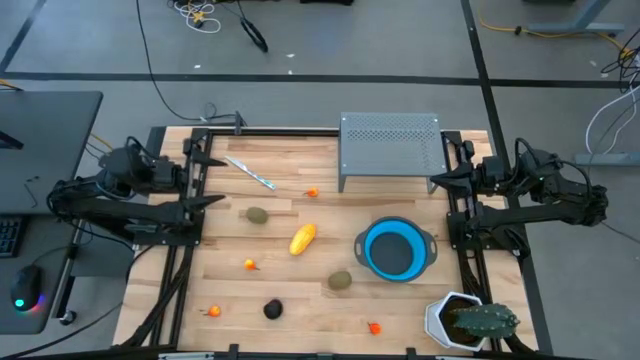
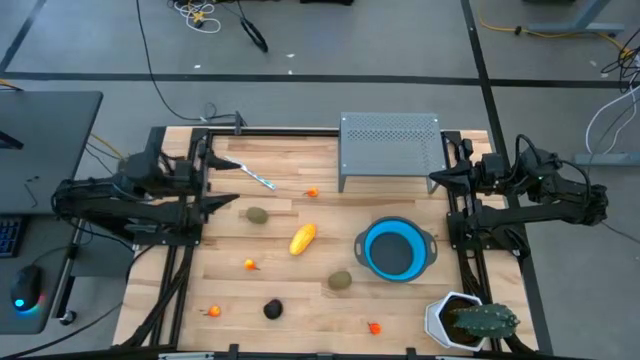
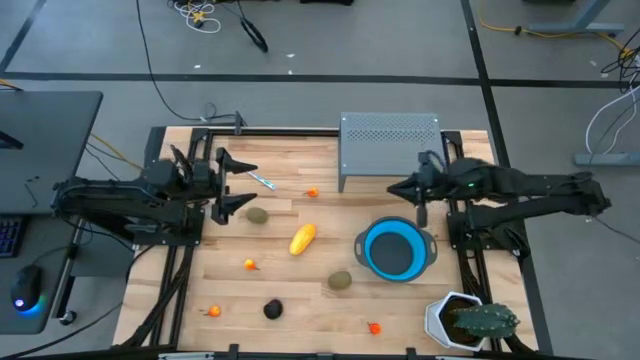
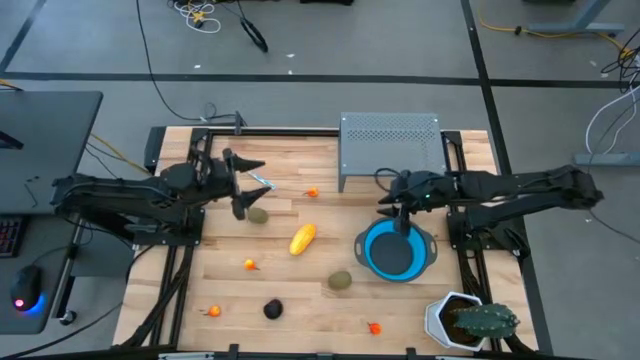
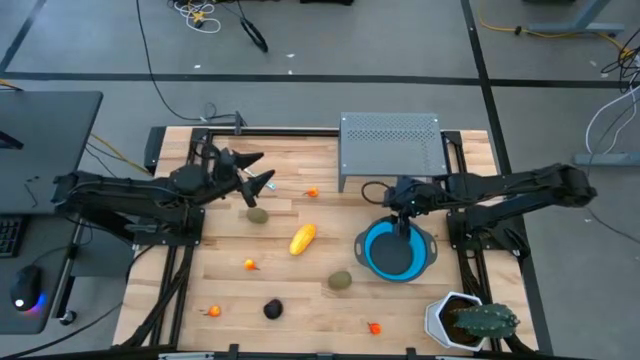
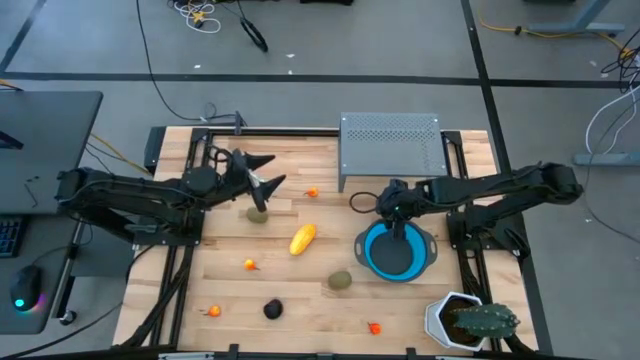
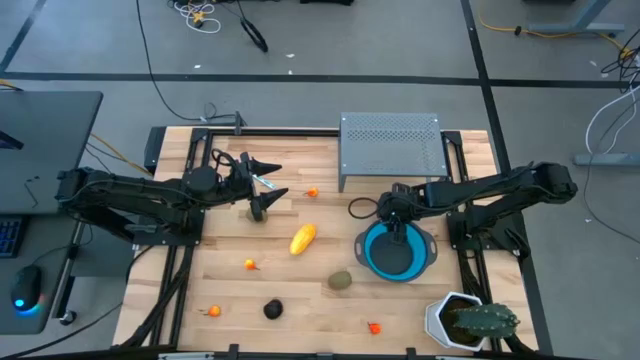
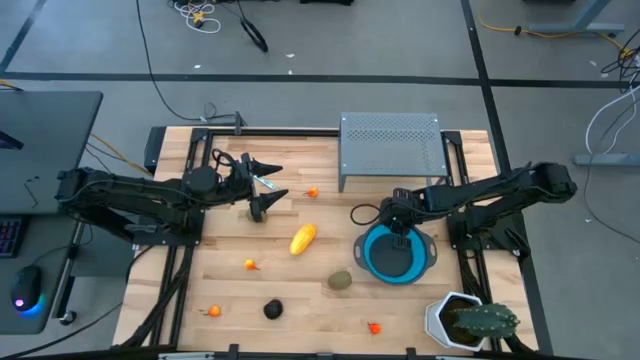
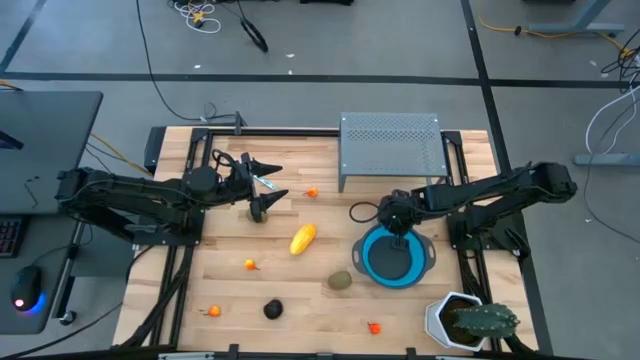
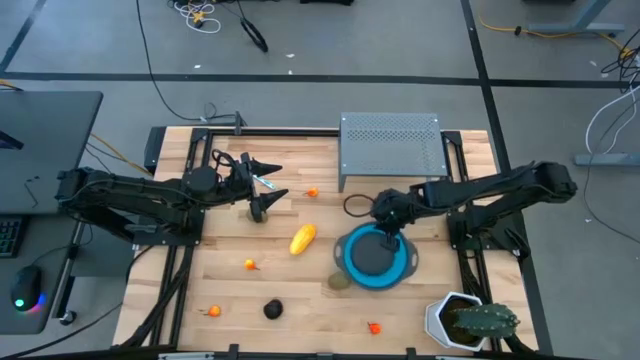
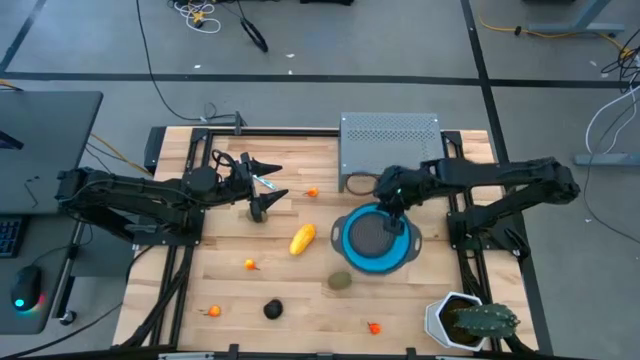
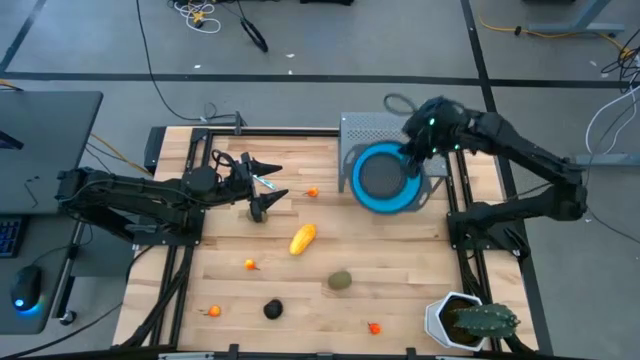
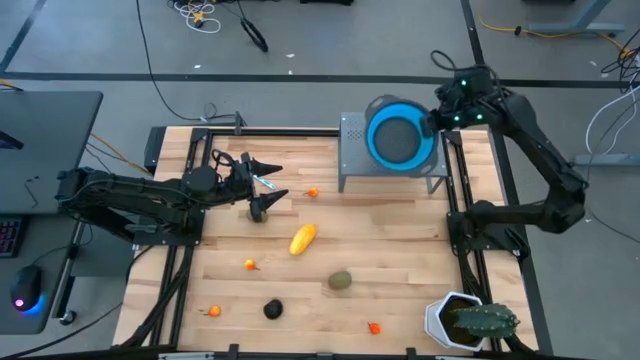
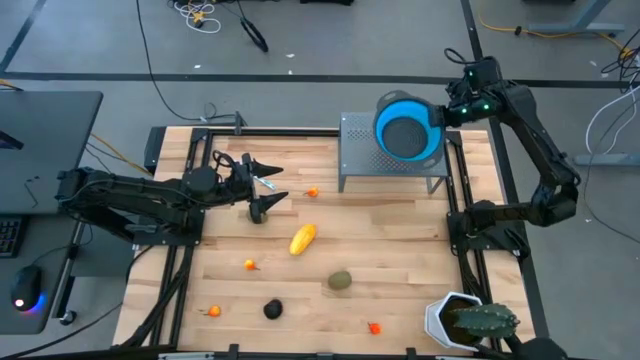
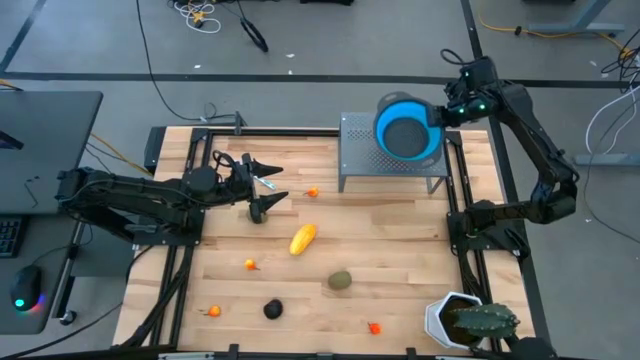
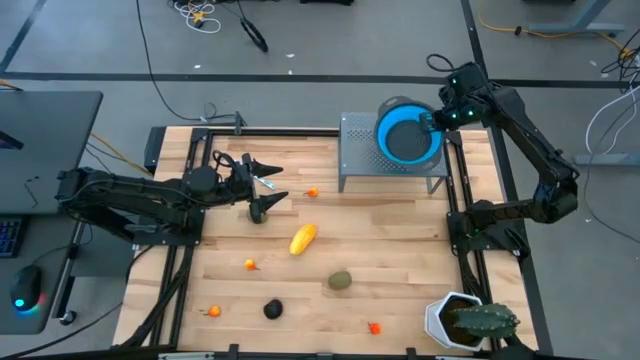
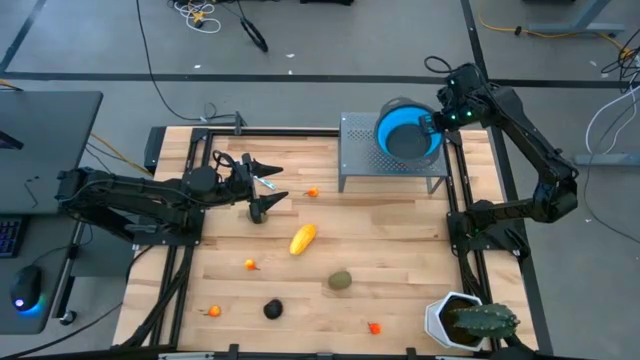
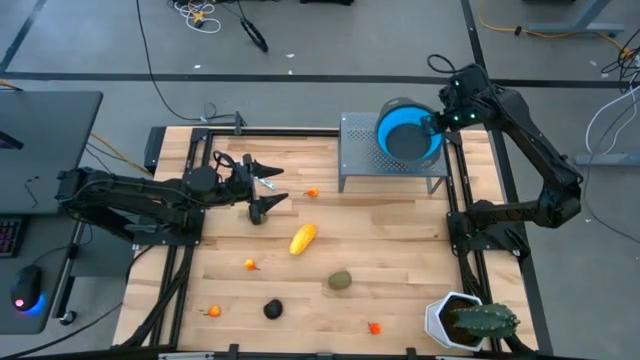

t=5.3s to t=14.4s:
Task: Pick & Place Fruit
Put the blue strainer bowl on the shelf

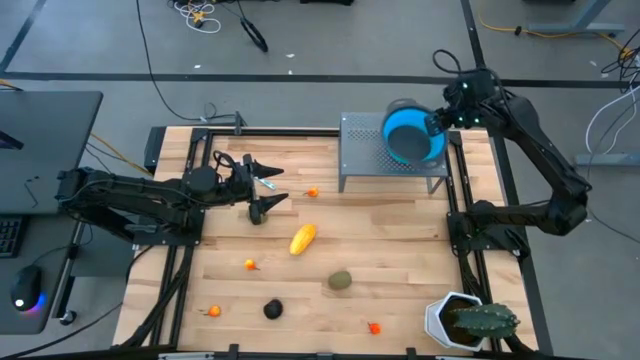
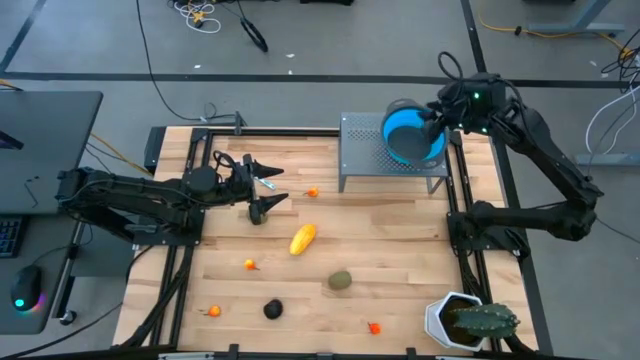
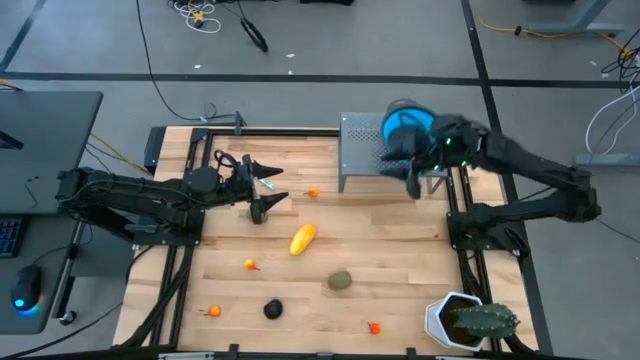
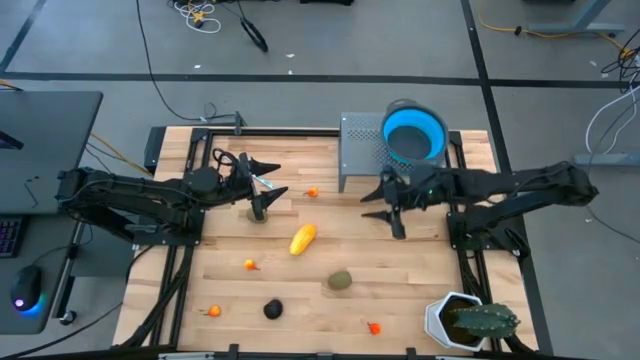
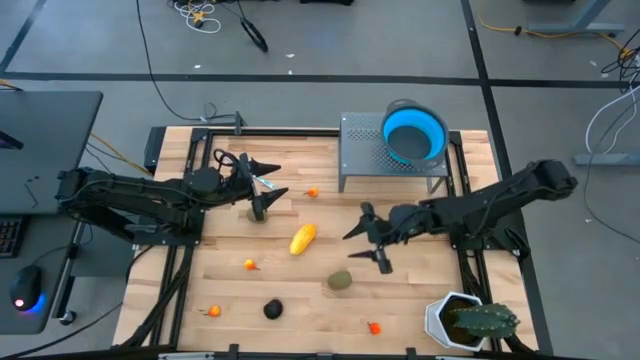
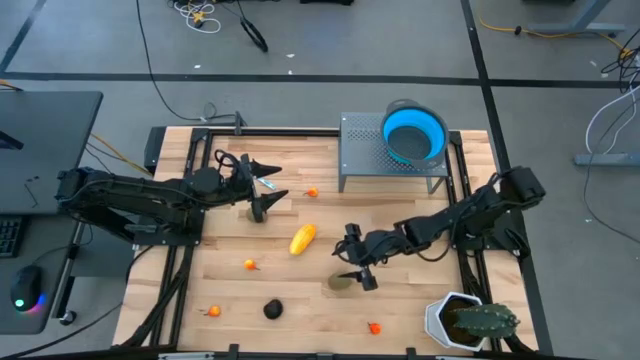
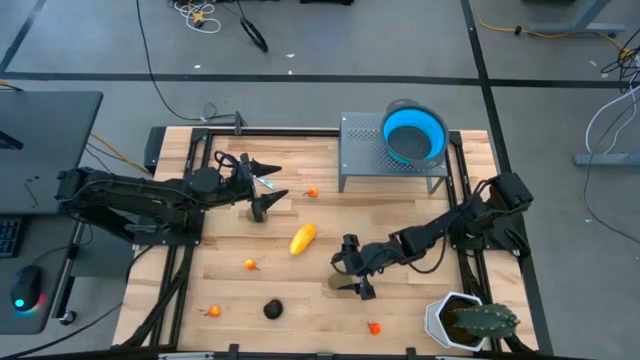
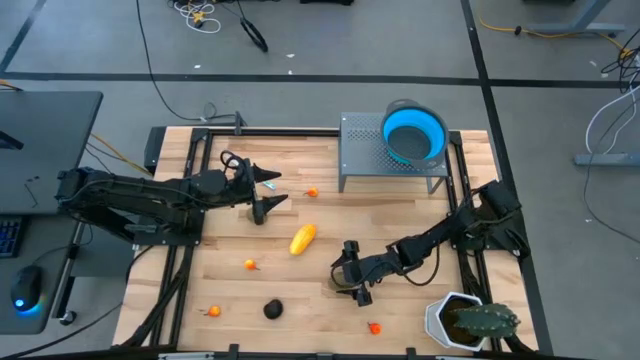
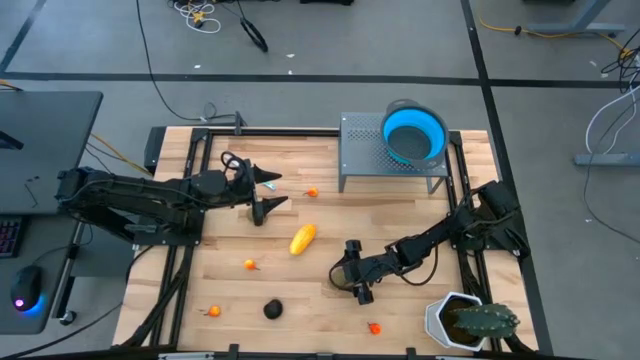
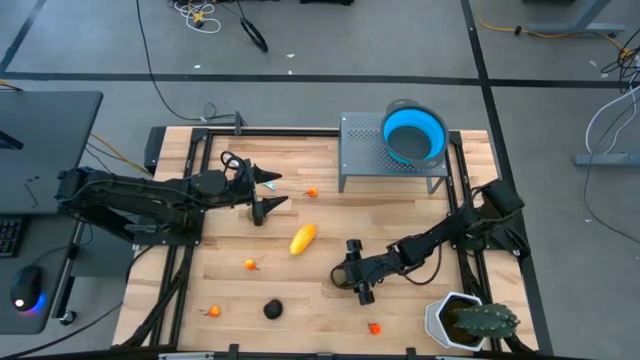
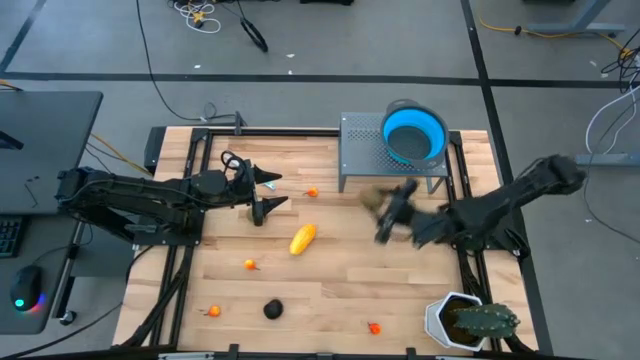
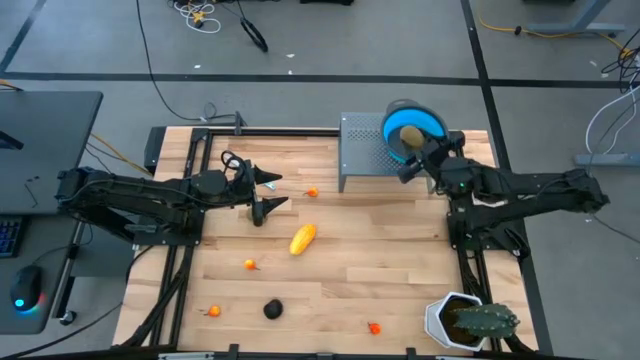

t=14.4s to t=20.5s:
Put the brown kiwi into the blue strainer bowl on the shelf

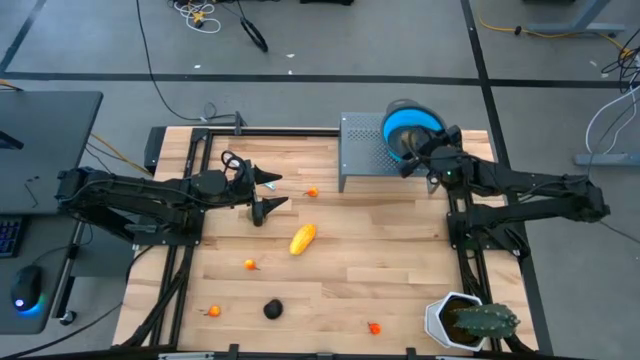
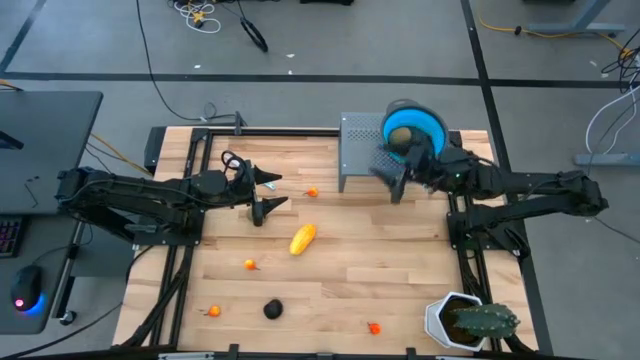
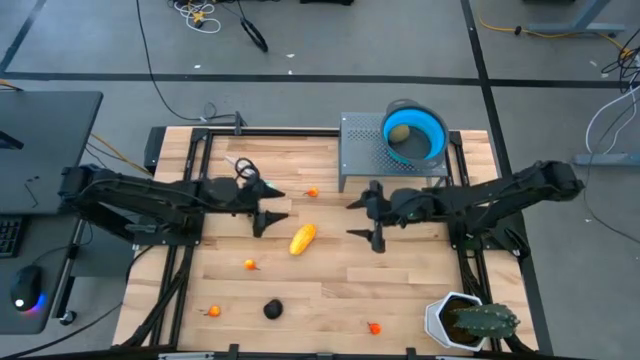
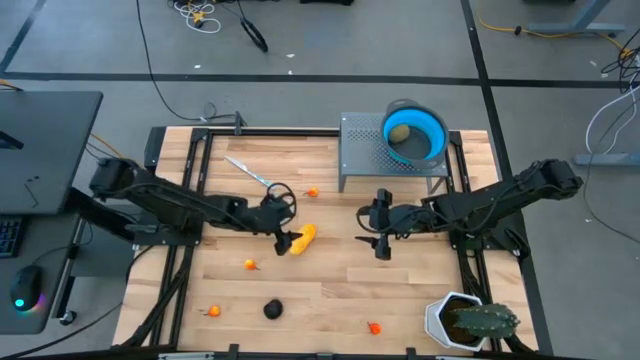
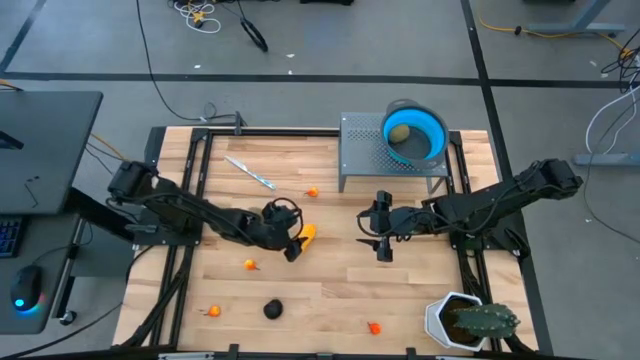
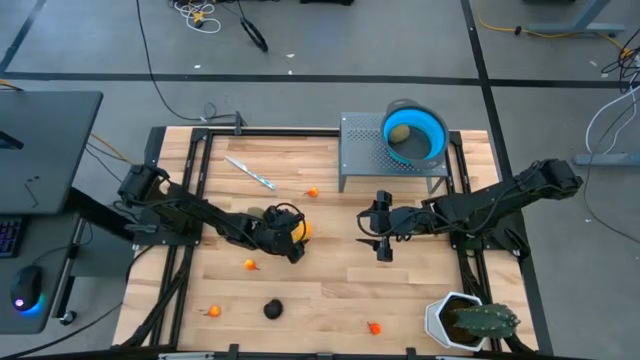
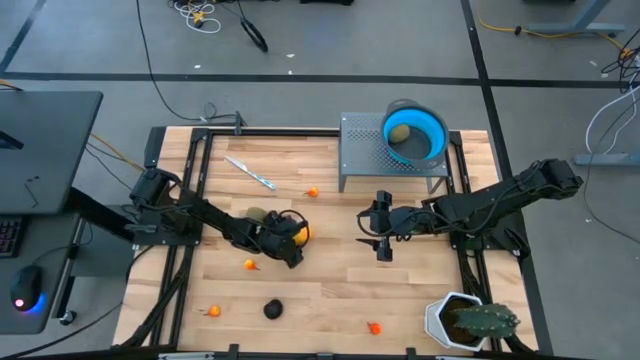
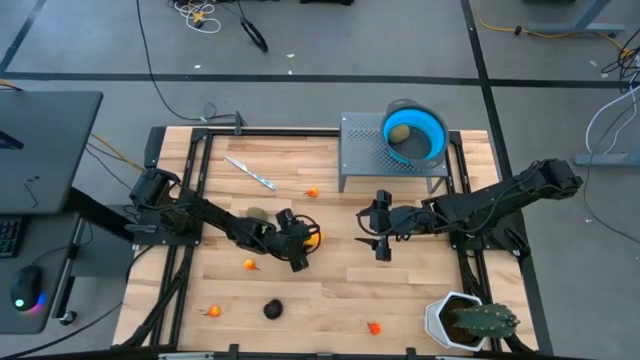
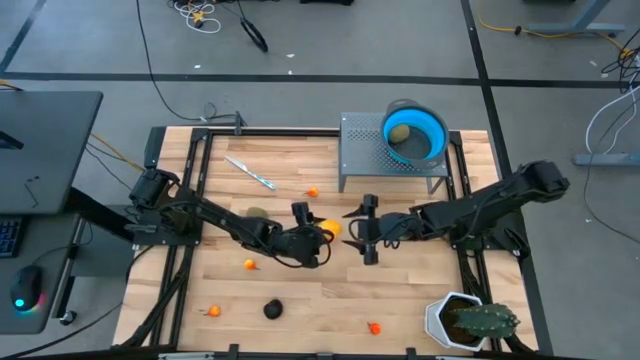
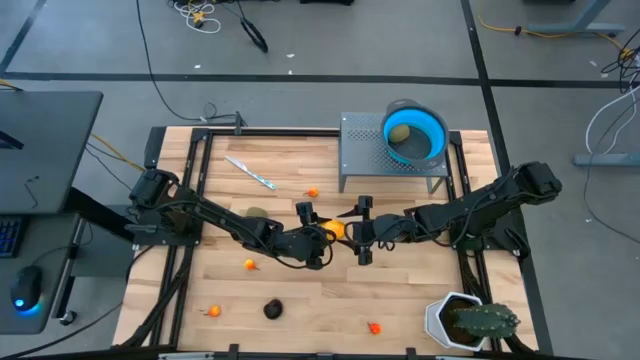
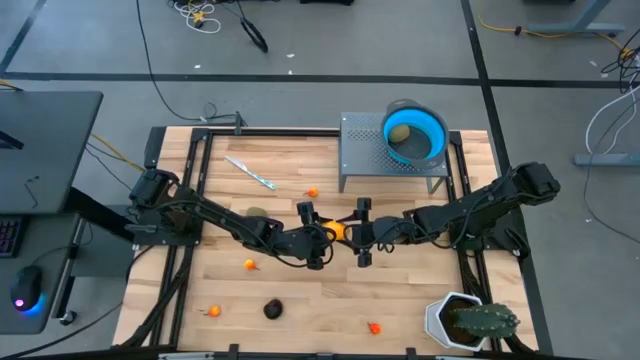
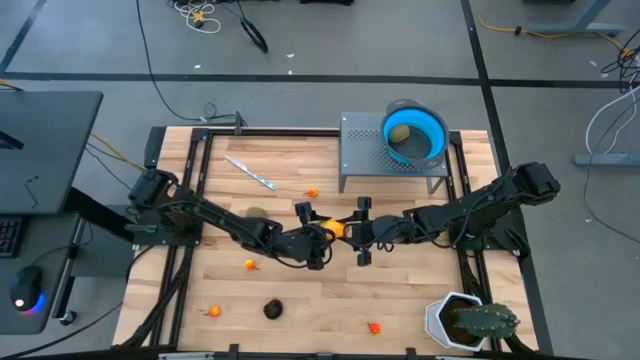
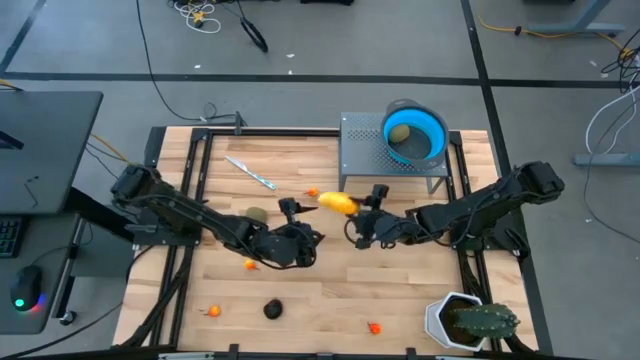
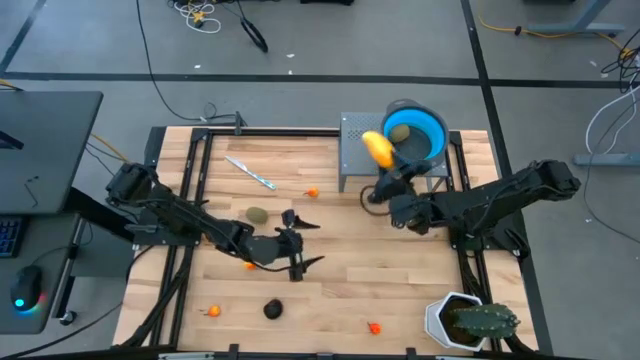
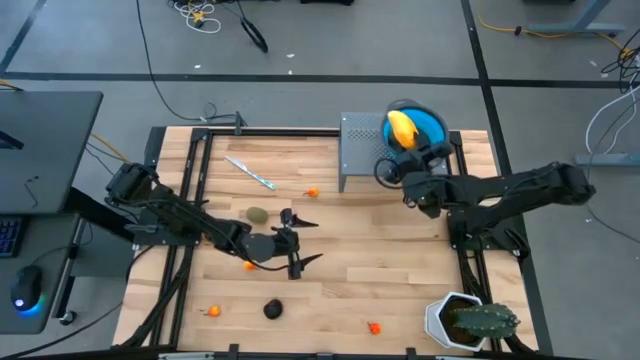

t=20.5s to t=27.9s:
Put the yellow mango into the blue strainer bowl on the shelf
